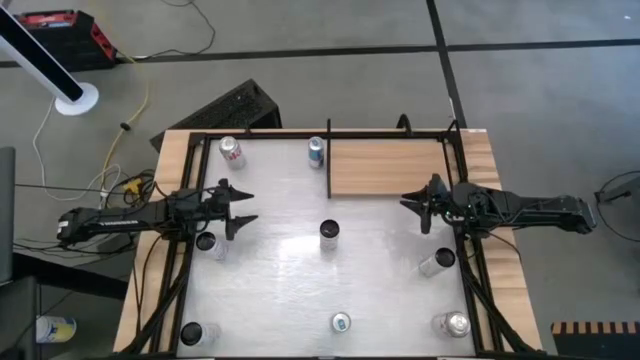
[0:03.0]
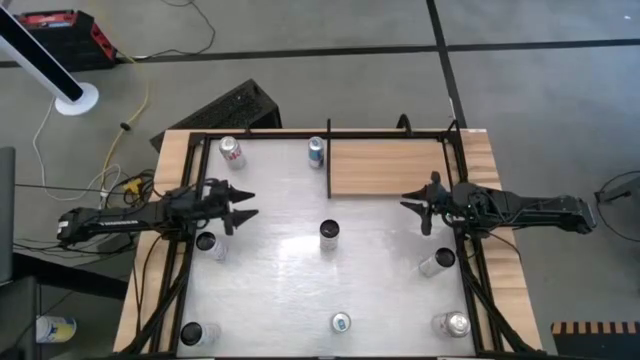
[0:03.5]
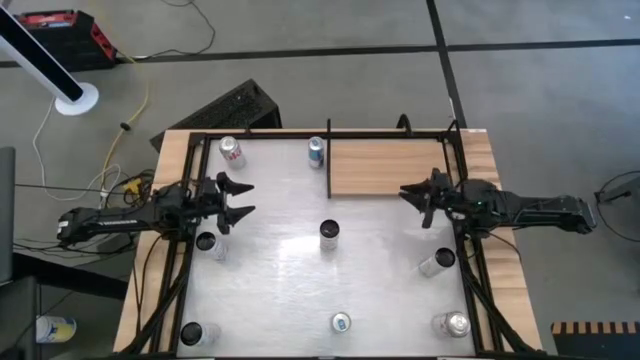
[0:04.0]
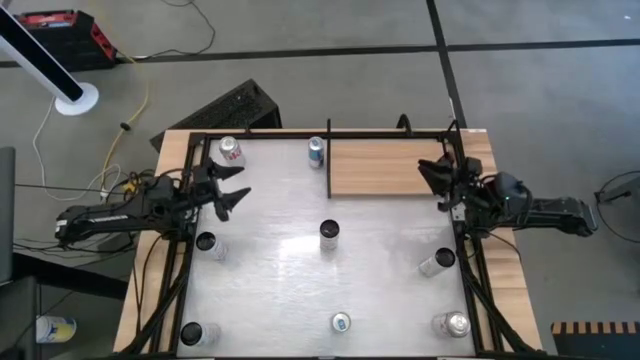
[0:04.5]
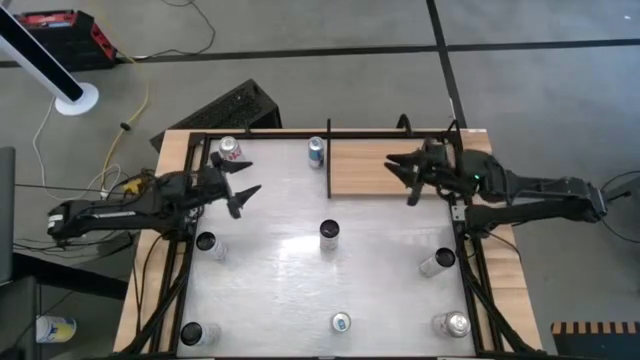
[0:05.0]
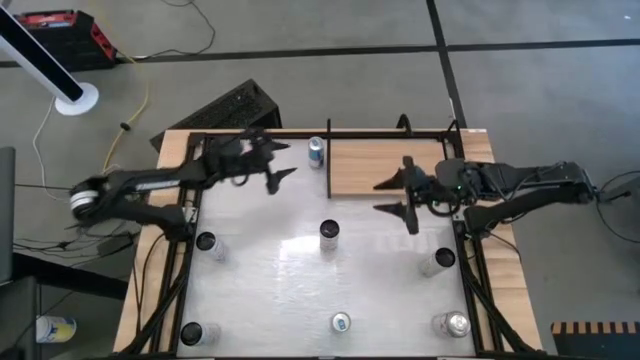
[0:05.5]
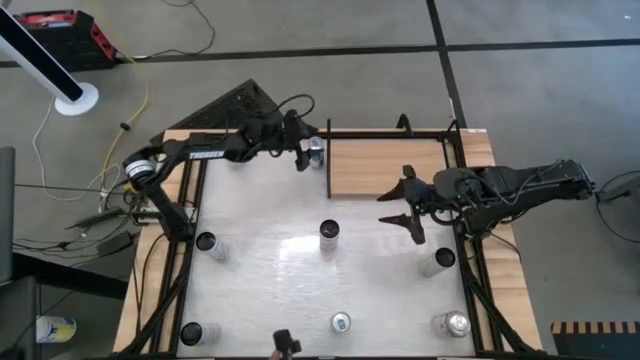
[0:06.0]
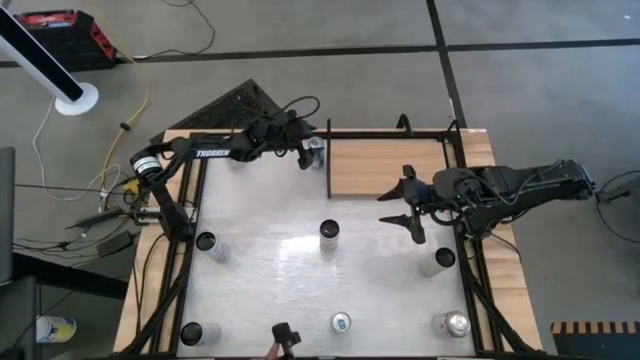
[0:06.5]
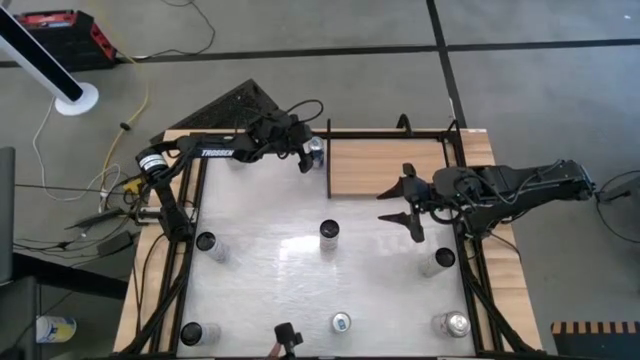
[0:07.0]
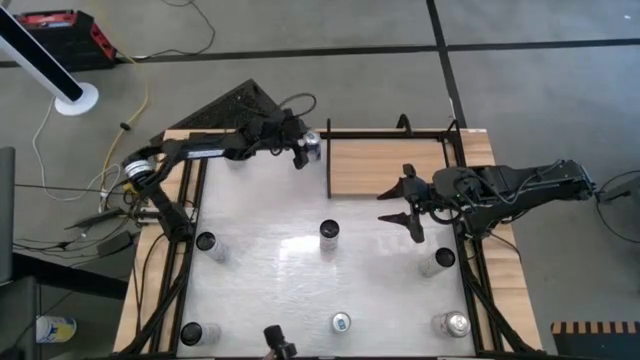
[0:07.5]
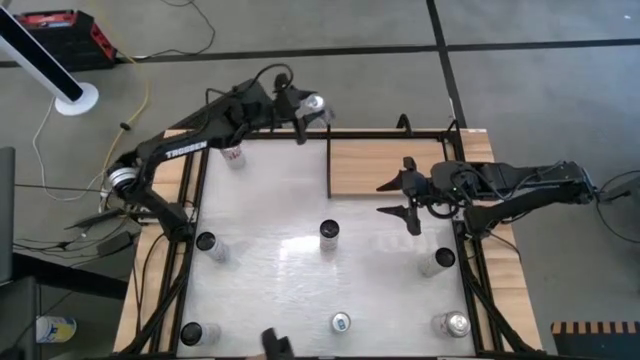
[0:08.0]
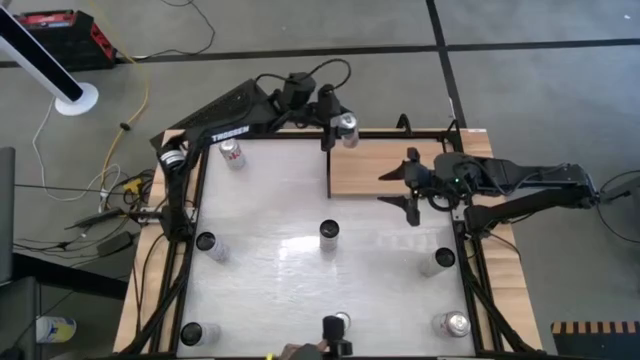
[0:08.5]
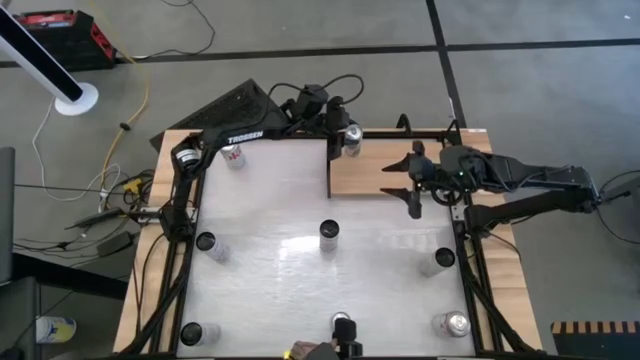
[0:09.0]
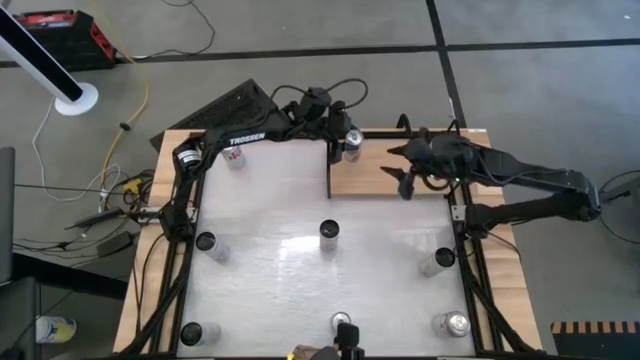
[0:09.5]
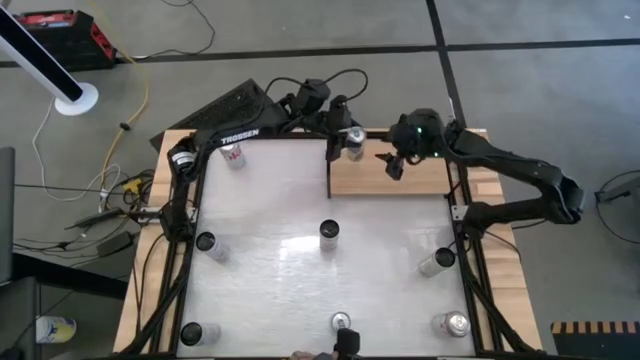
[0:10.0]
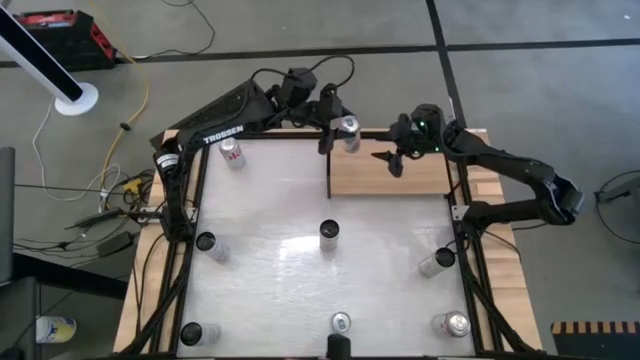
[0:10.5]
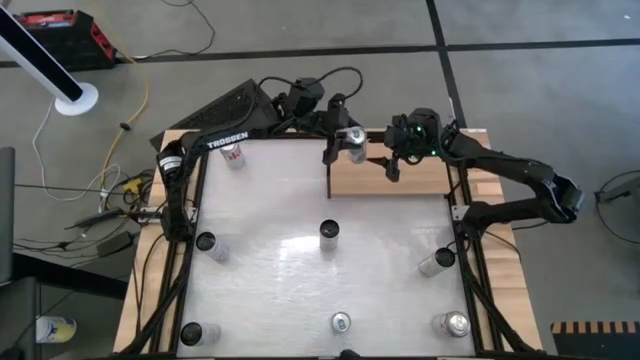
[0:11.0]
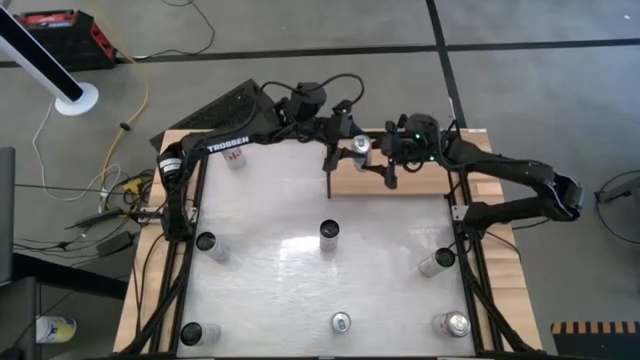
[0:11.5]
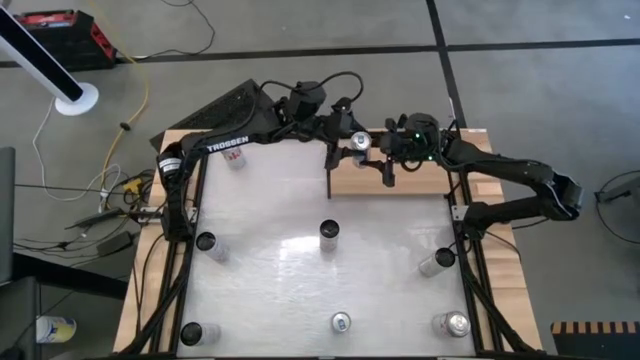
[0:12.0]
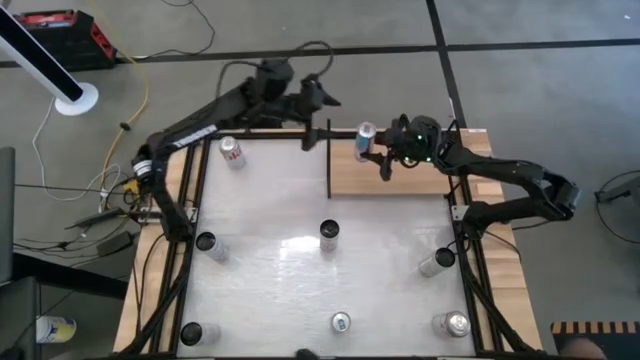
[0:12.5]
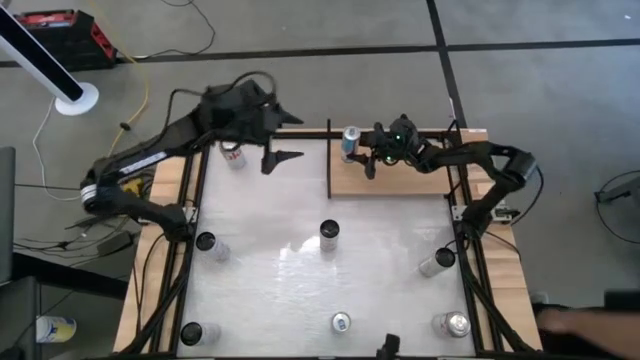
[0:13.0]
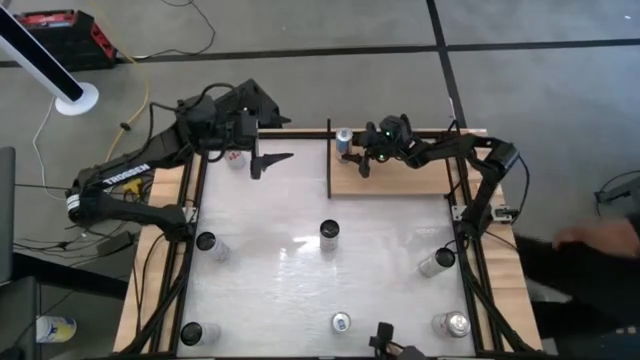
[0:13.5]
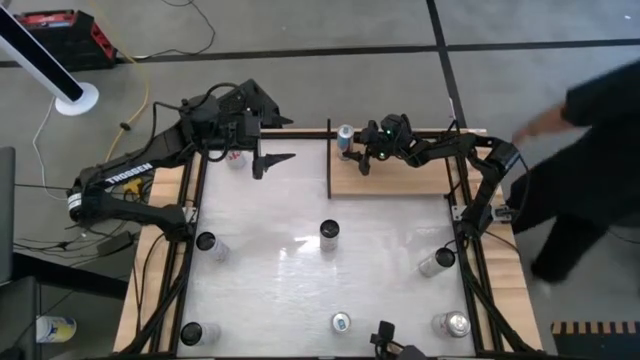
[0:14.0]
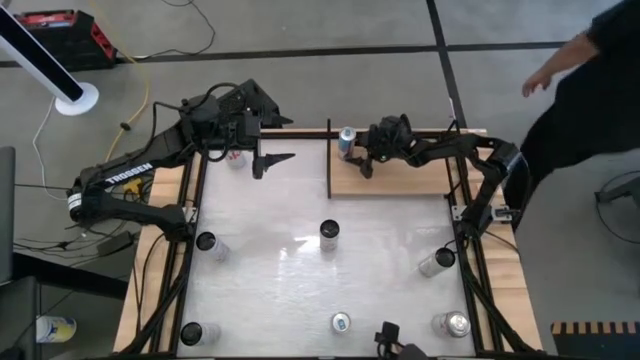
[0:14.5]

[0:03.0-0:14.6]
Task: Place canned beverage on shelf
Put the top blue soda can

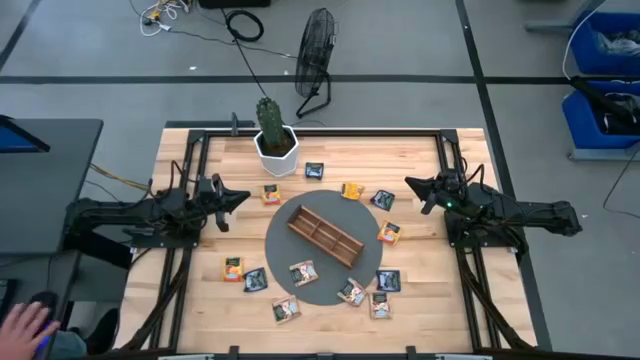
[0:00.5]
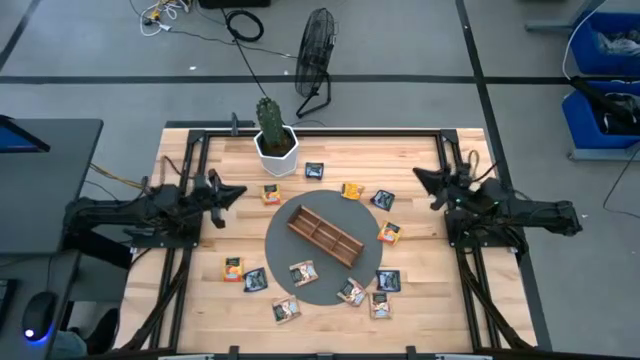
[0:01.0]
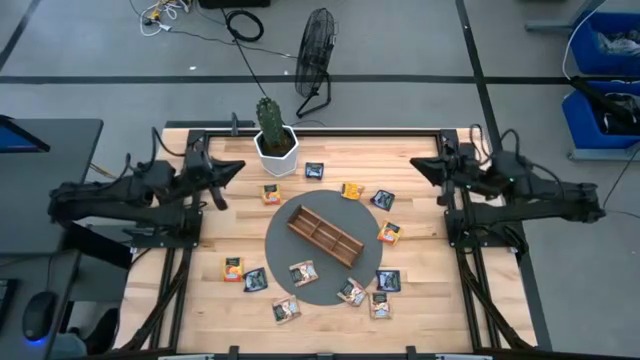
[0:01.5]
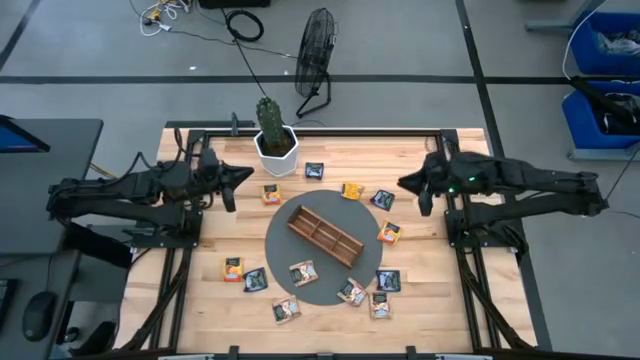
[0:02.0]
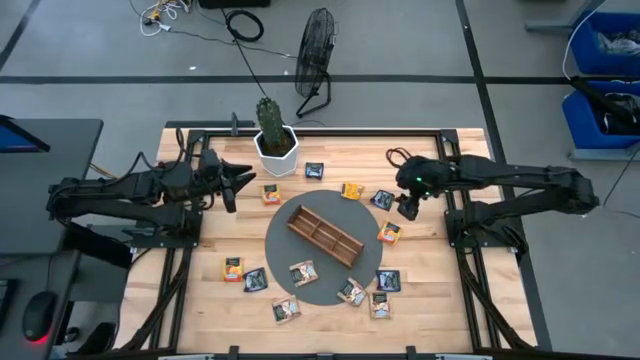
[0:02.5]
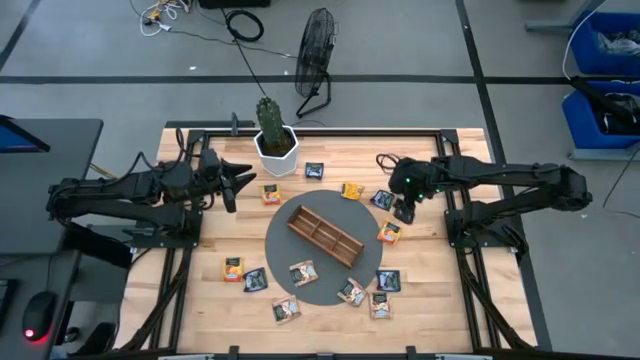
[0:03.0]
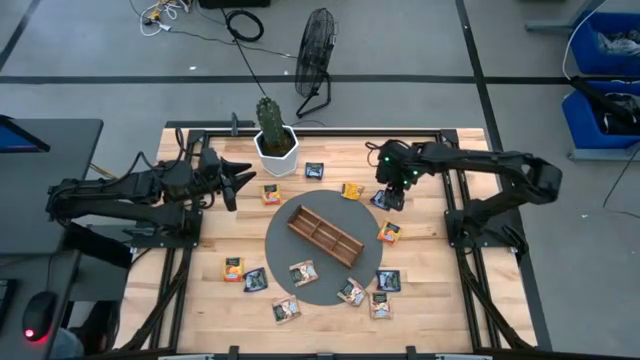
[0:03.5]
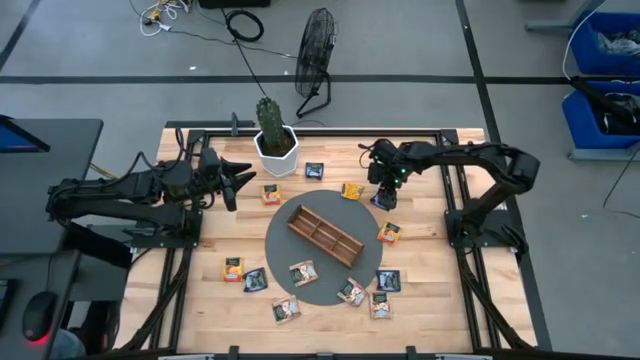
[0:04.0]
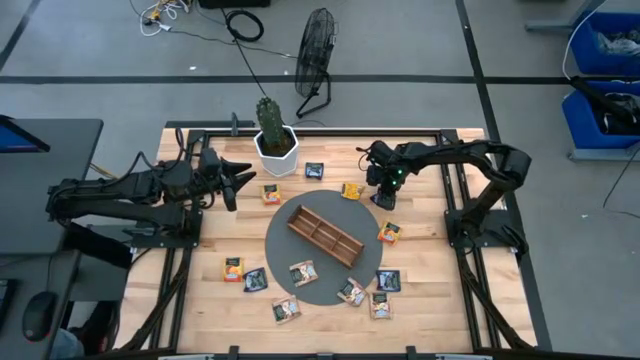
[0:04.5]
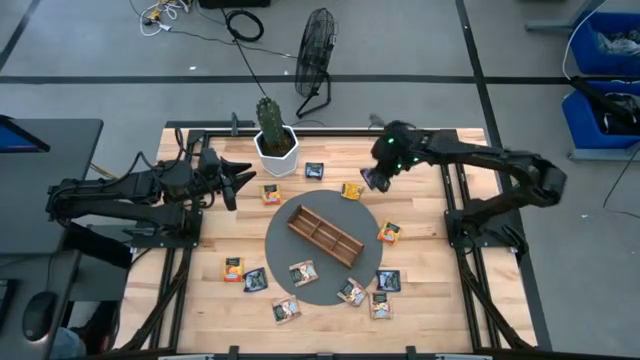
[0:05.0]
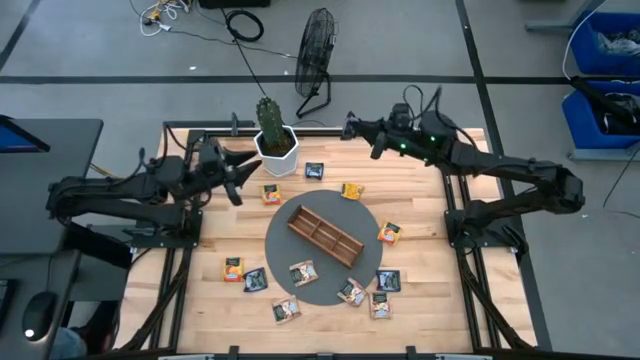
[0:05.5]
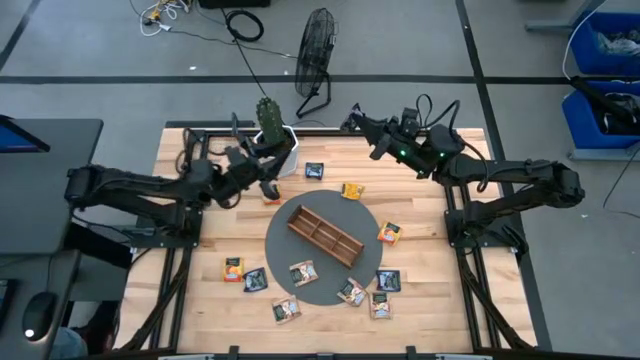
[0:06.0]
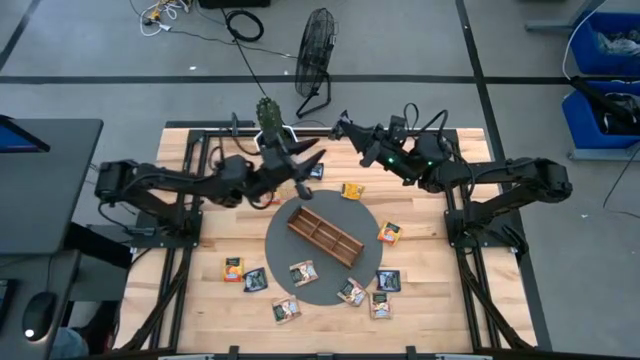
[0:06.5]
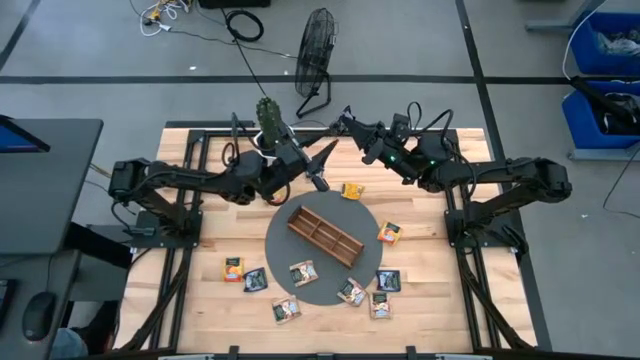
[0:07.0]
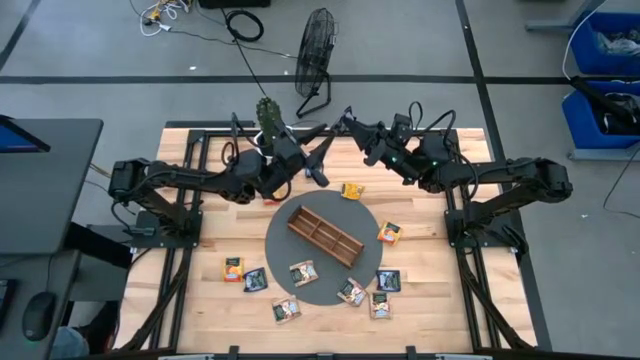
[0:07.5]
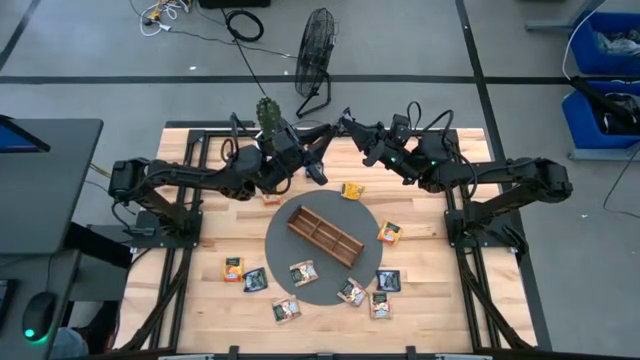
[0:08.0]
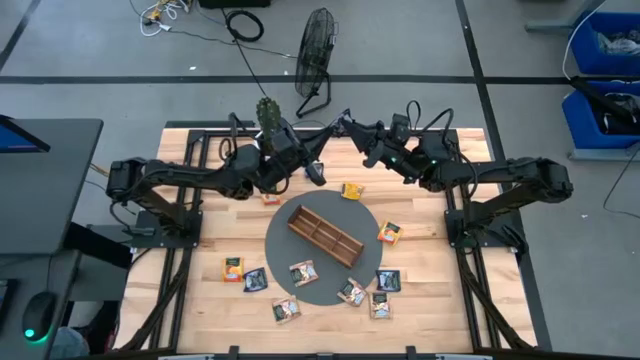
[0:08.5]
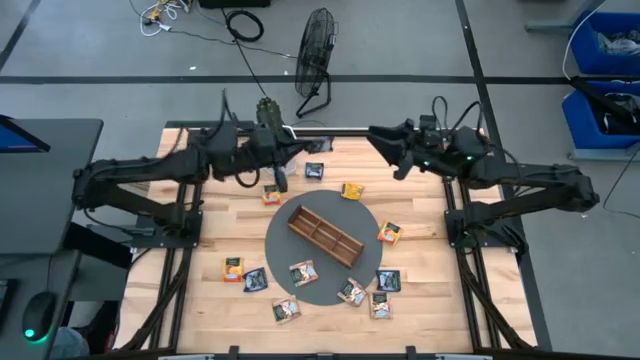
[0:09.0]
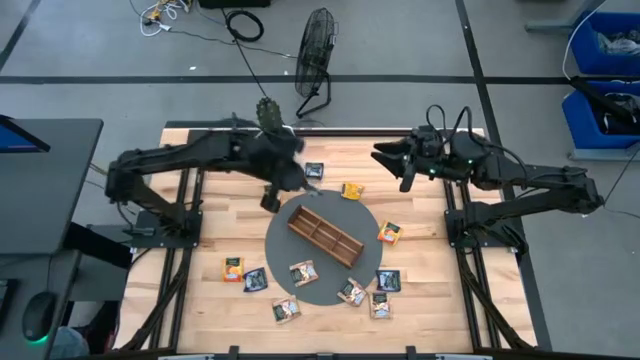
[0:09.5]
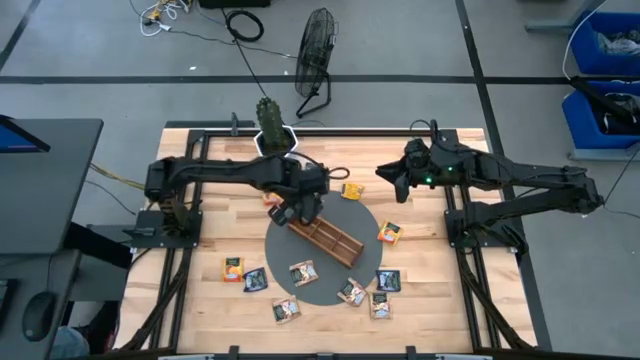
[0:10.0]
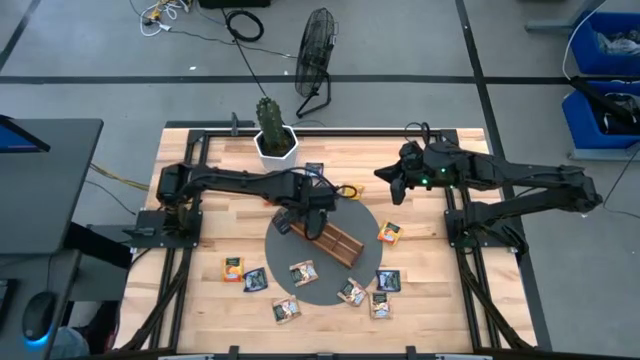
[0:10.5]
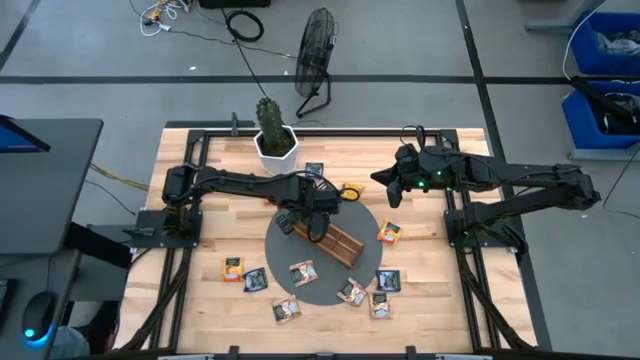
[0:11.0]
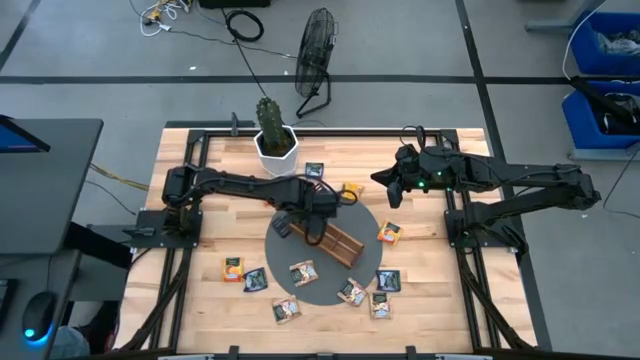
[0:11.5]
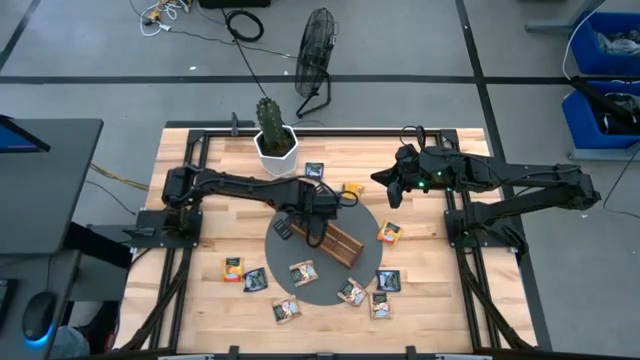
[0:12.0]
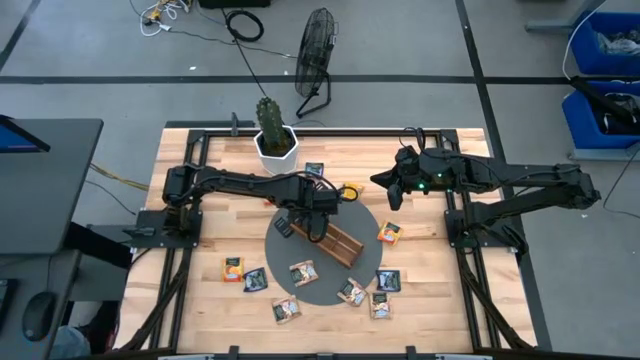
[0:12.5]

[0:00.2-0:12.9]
Task: Pick & Place Tea
Put the purple tea bag into the left section of the wooden organizer
